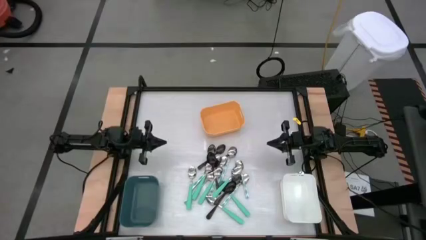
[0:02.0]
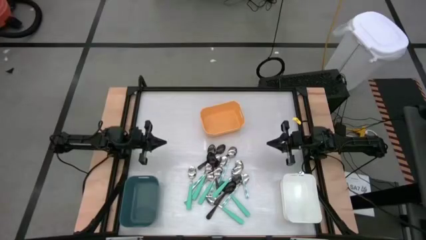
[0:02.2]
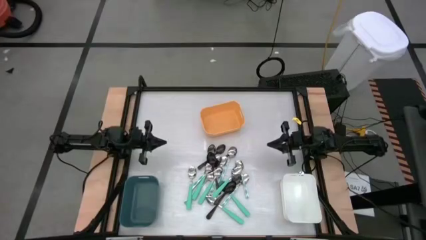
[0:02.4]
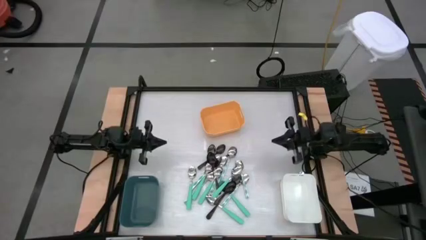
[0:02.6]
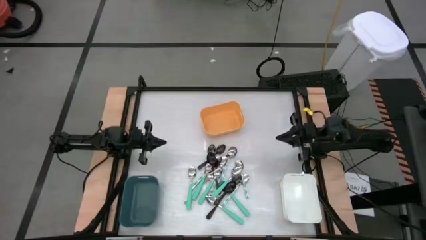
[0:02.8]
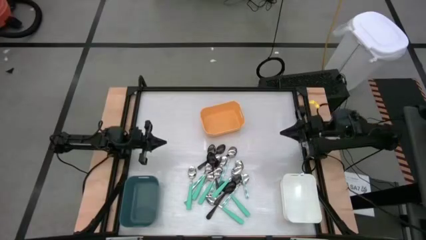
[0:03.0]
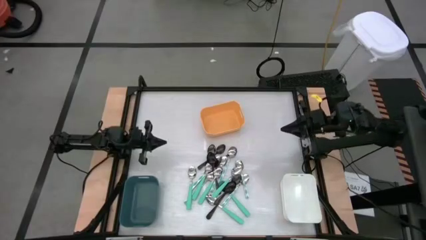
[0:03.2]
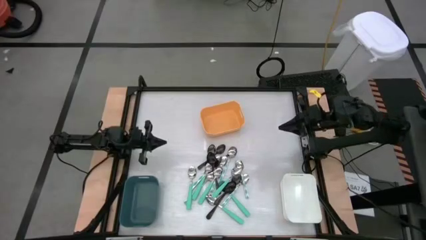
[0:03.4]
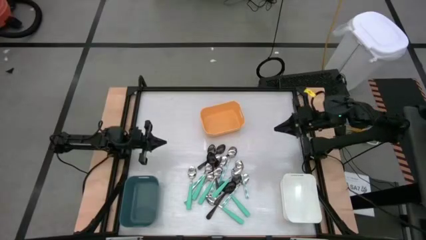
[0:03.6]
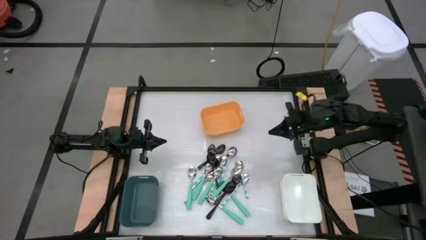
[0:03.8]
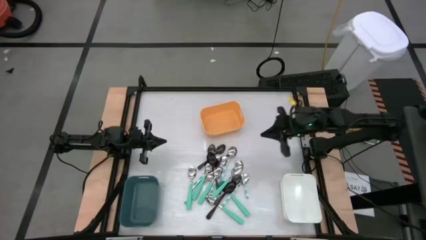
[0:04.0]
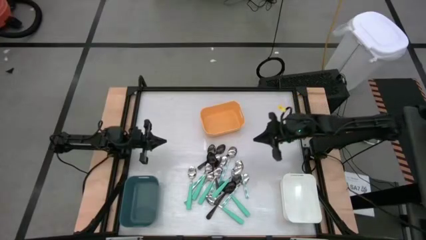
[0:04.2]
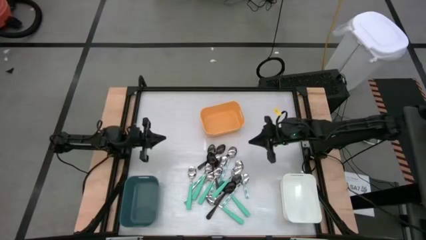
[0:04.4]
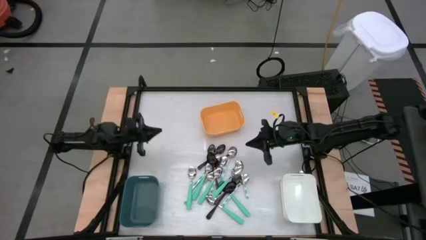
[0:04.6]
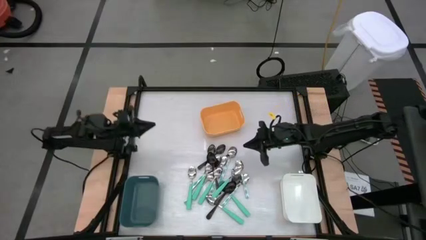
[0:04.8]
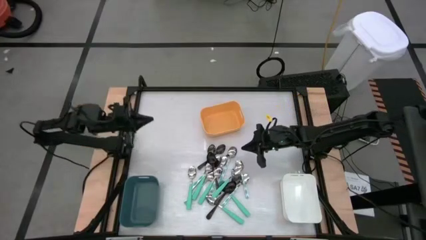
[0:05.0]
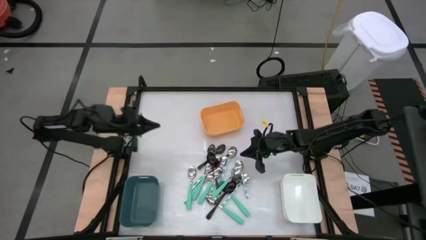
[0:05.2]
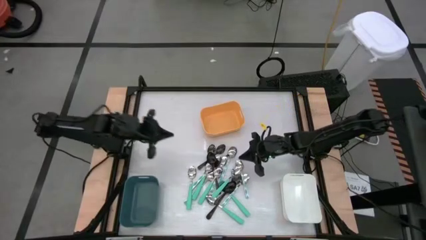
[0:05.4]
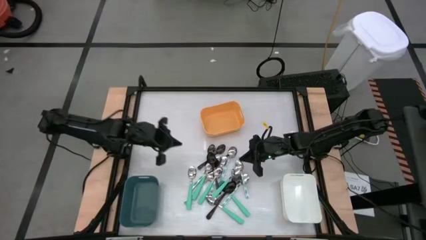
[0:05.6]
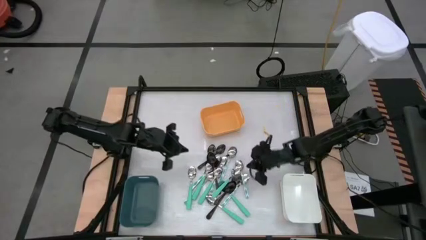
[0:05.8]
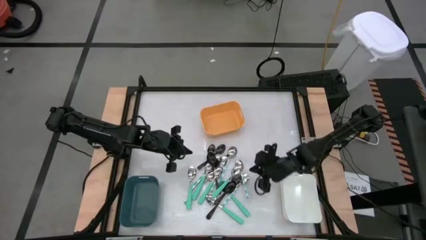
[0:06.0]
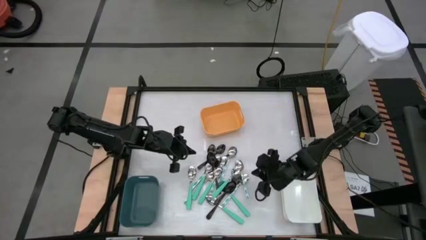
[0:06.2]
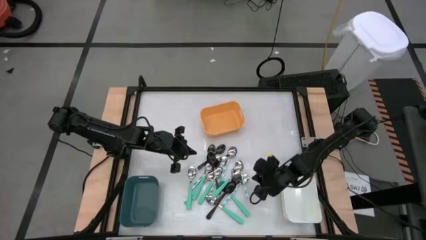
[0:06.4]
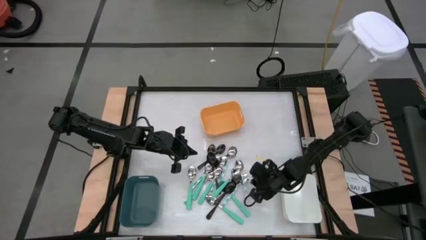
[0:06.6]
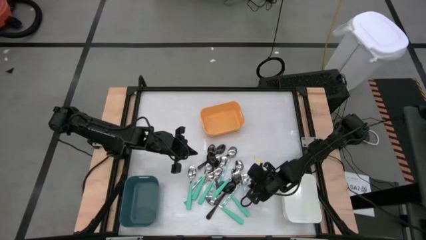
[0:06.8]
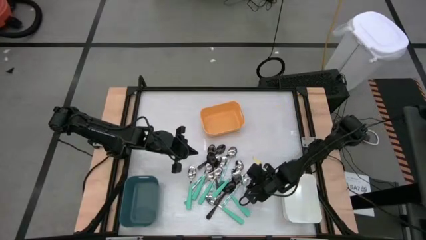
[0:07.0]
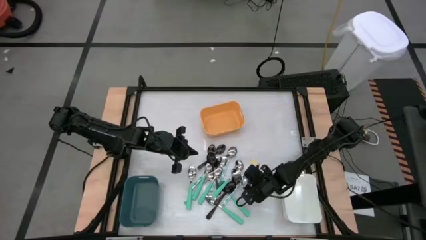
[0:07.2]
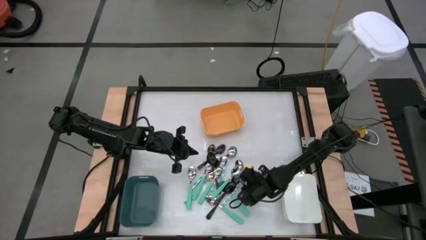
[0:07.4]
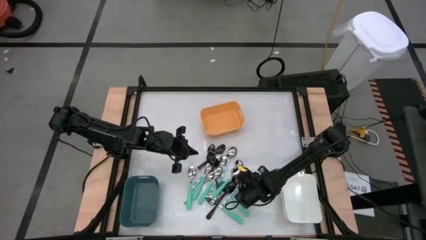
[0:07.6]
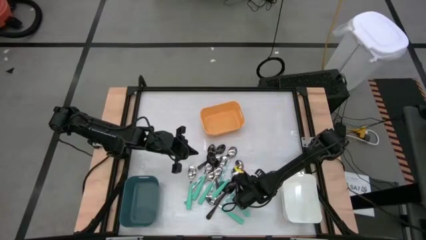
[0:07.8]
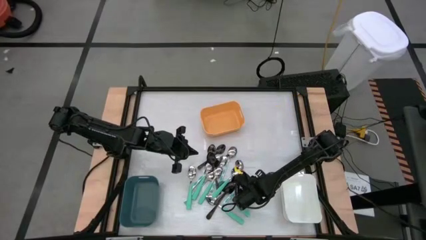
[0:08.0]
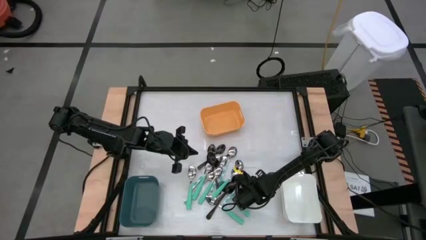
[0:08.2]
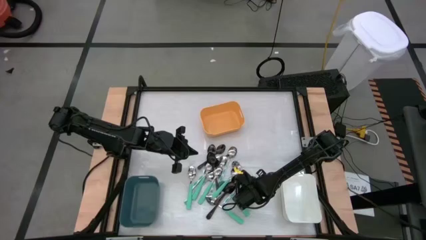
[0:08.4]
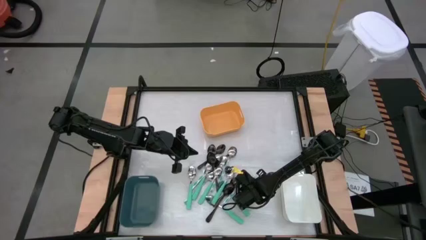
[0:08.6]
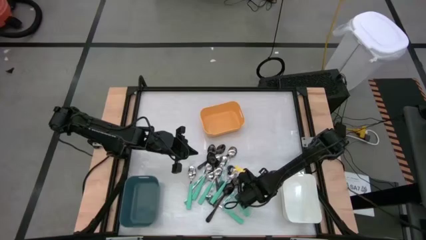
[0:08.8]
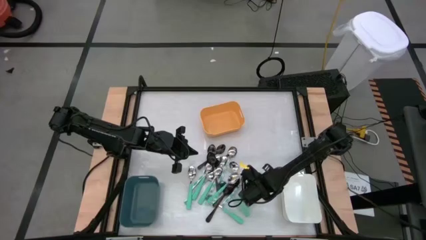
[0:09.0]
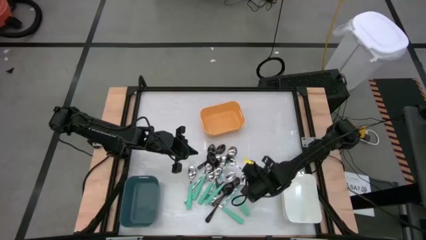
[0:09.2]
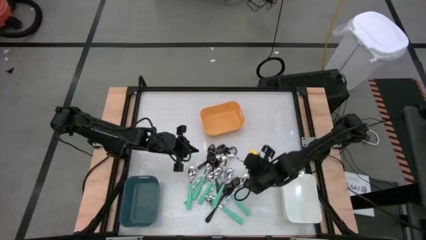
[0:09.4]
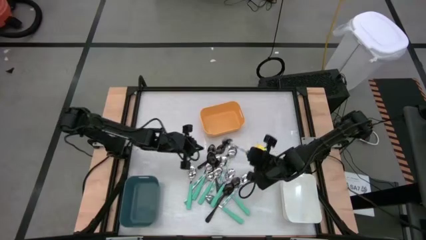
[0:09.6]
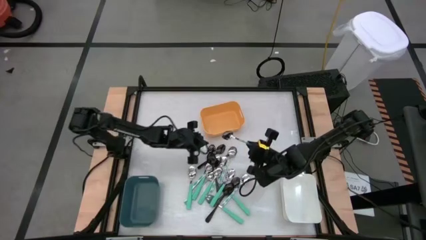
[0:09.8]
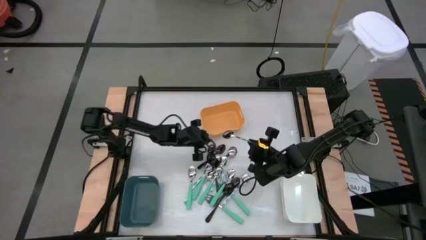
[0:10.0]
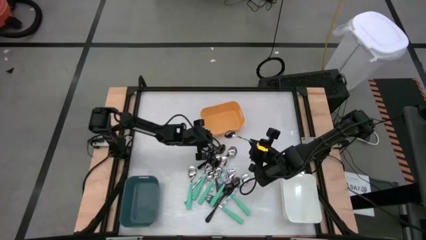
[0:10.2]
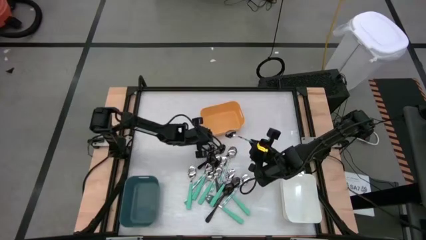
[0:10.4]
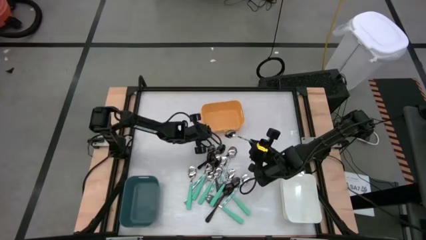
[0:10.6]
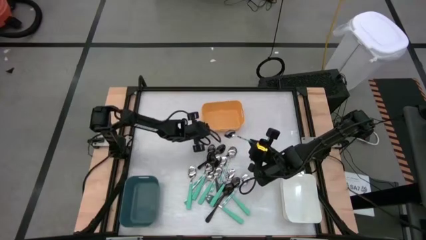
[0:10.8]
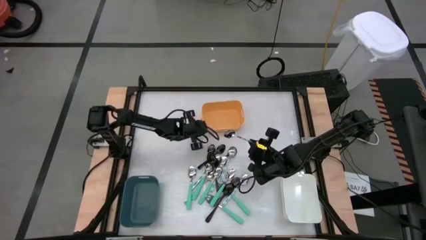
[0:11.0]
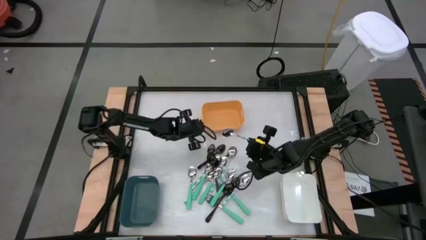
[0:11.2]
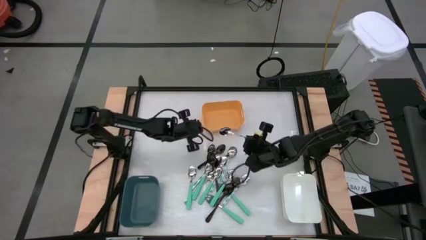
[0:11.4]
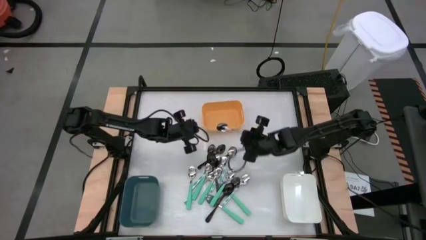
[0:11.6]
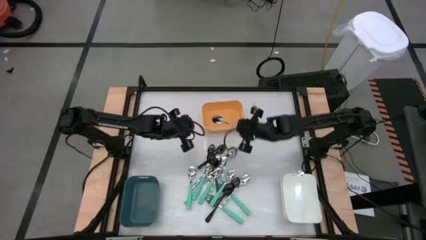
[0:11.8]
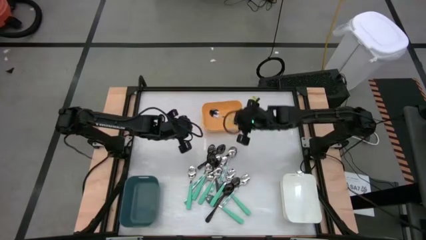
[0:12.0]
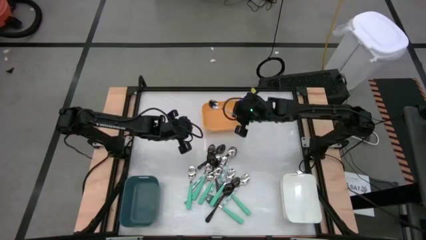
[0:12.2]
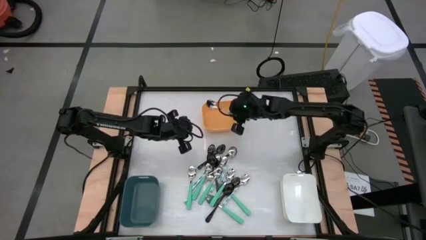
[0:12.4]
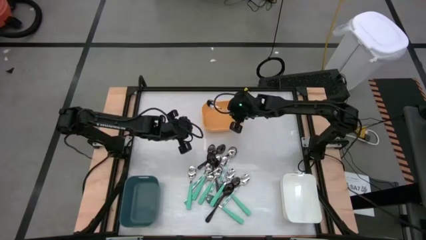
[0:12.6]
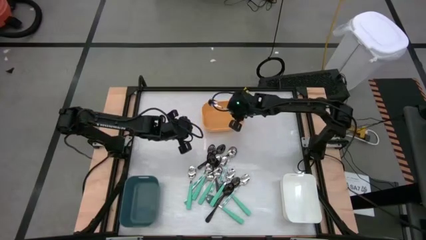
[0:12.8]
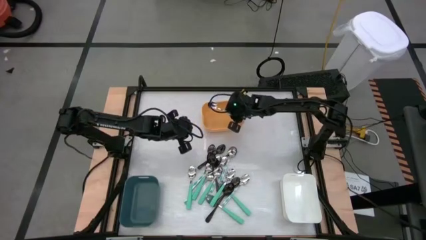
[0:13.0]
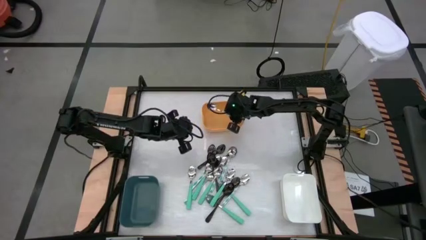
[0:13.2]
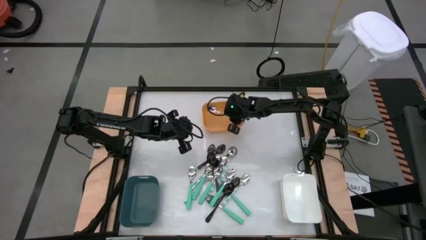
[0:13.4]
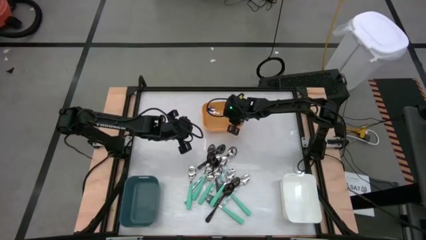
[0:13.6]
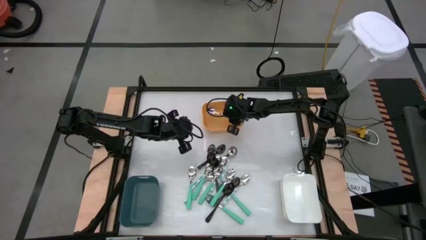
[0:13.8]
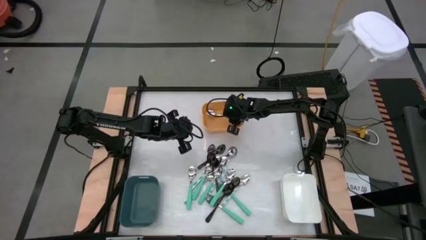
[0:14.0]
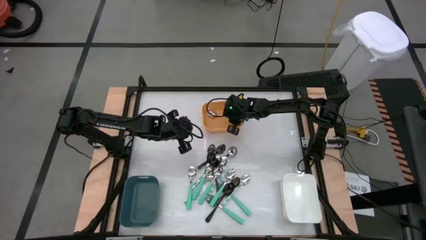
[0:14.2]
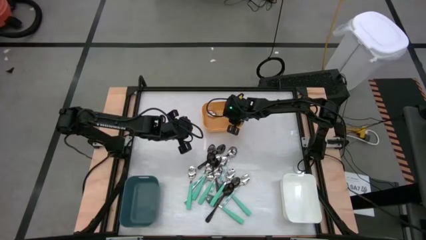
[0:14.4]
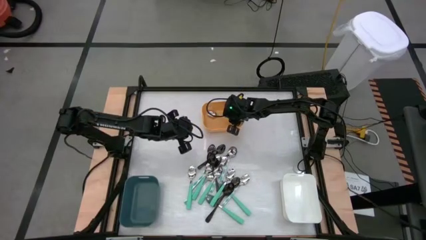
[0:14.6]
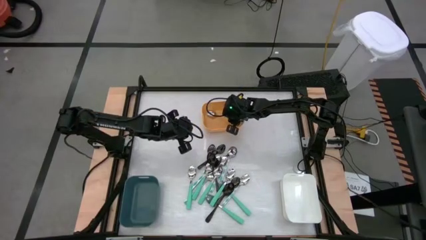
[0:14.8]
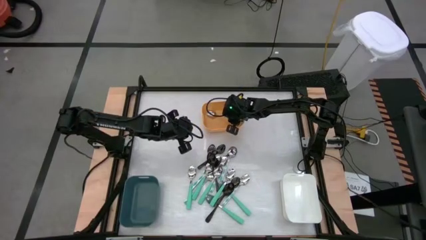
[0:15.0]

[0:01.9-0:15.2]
Task: Sort silverware by color (type)
Put the white patterned spoon into the yellow bin
